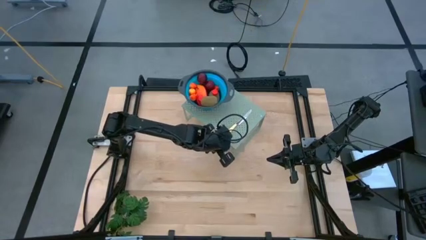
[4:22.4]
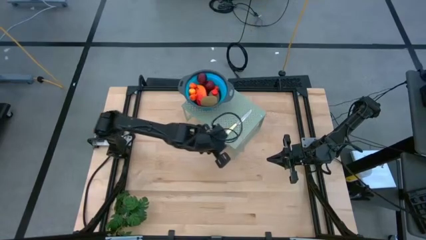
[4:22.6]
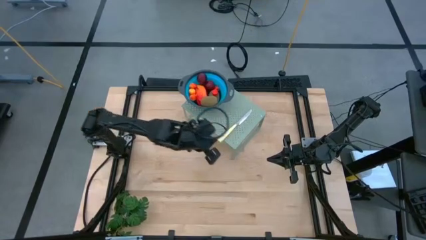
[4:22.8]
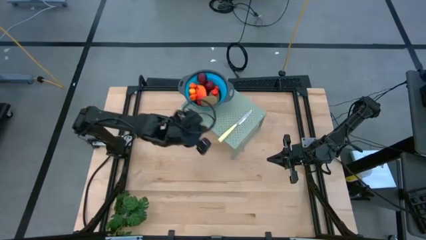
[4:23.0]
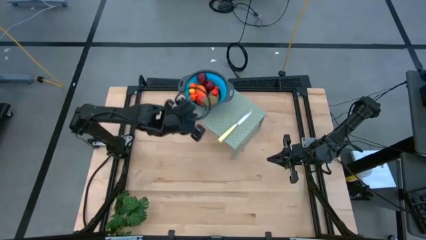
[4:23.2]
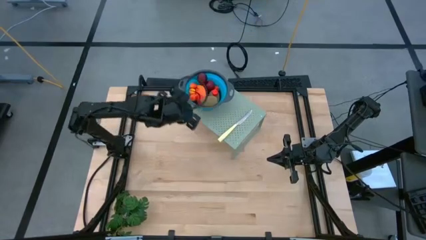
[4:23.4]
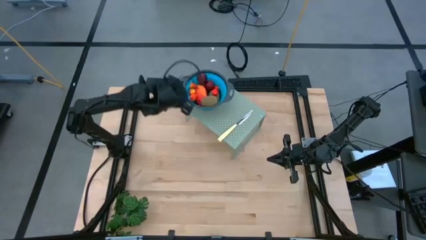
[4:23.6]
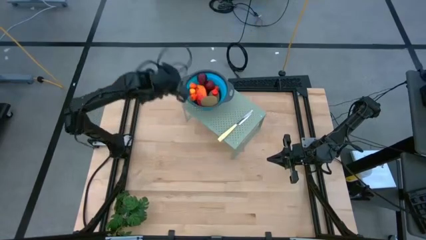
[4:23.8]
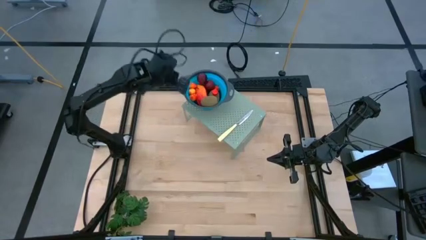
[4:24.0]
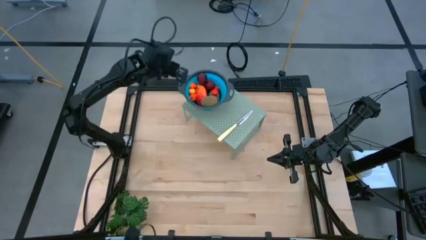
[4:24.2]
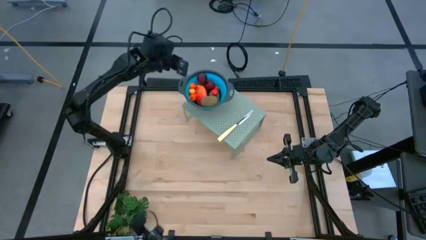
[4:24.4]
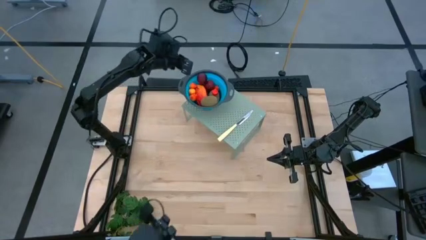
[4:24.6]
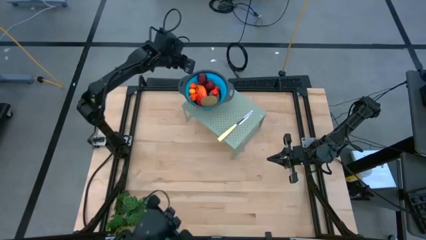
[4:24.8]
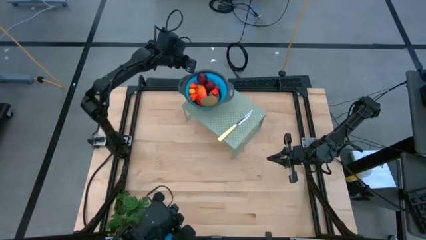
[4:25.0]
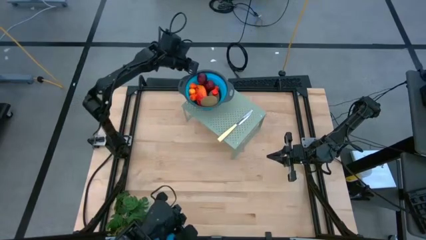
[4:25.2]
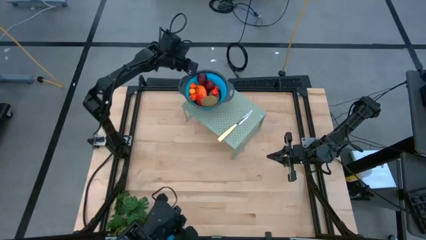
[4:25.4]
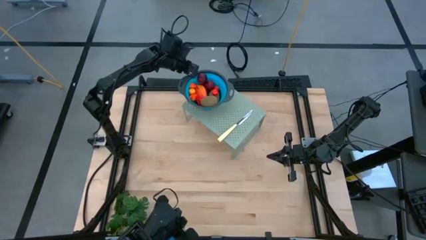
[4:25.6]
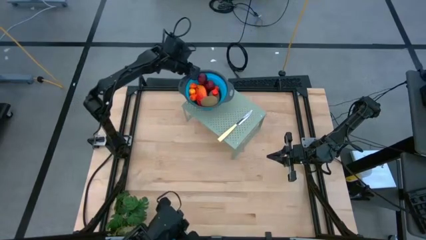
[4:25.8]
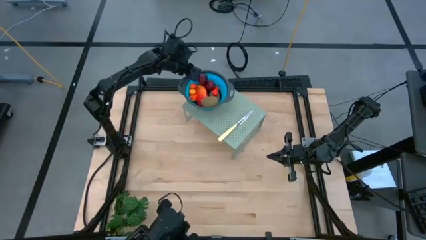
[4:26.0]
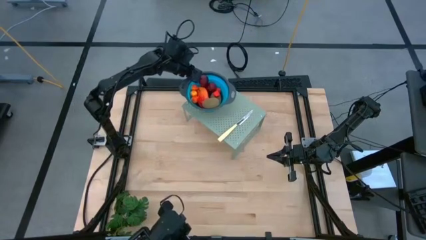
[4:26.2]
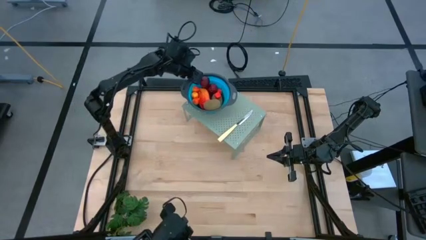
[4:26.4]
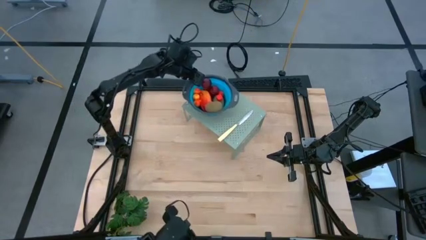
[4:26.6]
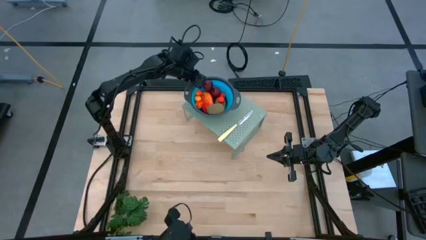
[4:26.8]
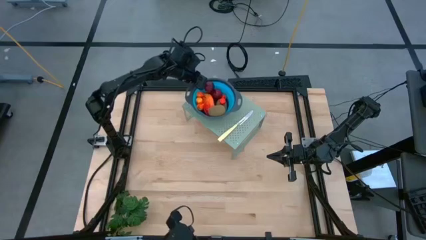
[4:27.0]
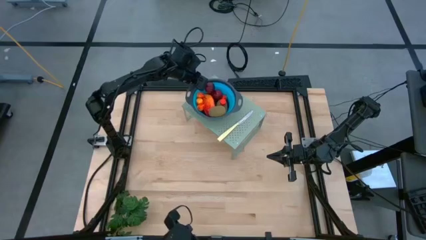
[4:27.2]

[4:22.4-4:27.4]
Task: Pick & Place Fruit
Adjust the blue strainer bowl on the shelf

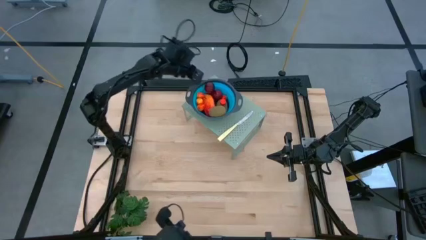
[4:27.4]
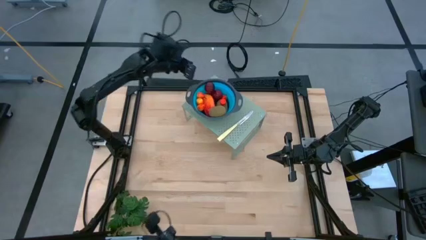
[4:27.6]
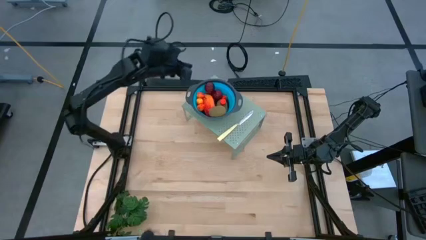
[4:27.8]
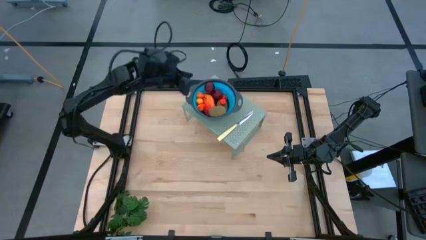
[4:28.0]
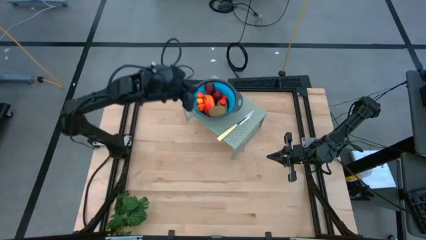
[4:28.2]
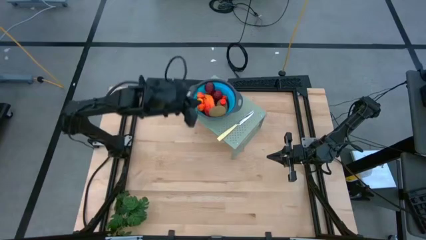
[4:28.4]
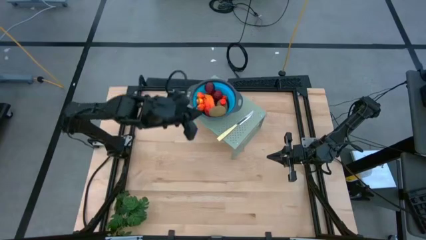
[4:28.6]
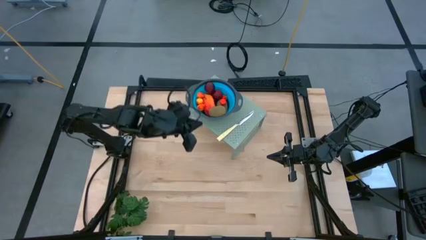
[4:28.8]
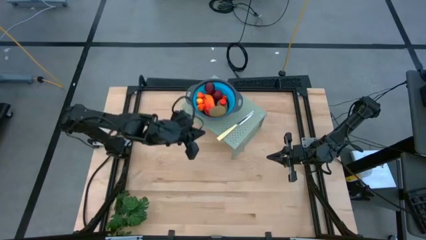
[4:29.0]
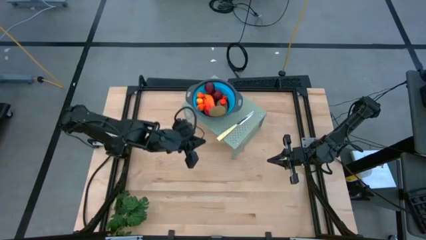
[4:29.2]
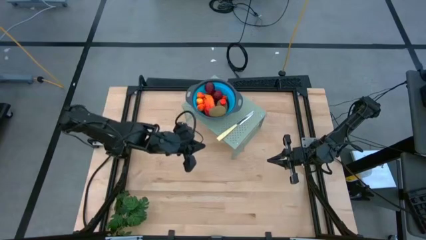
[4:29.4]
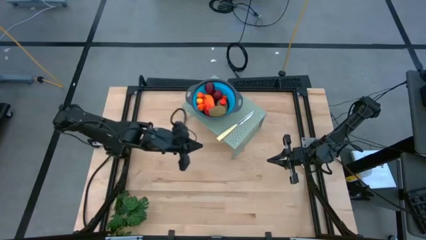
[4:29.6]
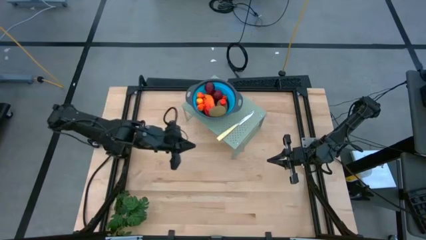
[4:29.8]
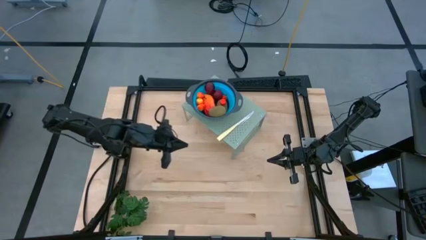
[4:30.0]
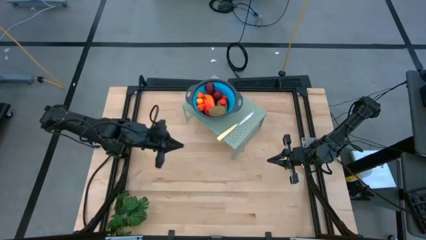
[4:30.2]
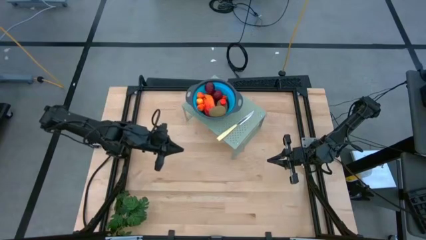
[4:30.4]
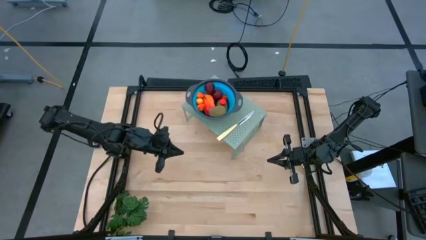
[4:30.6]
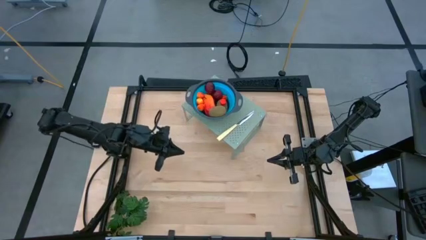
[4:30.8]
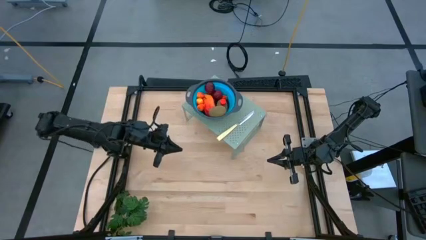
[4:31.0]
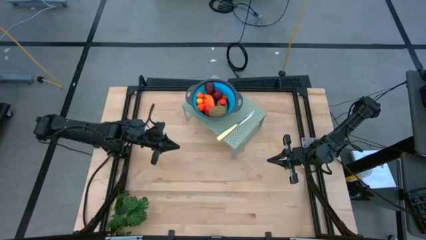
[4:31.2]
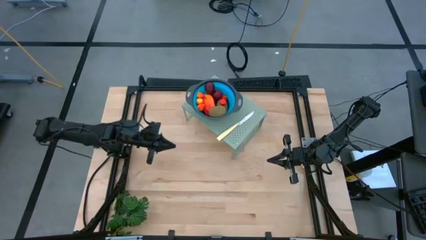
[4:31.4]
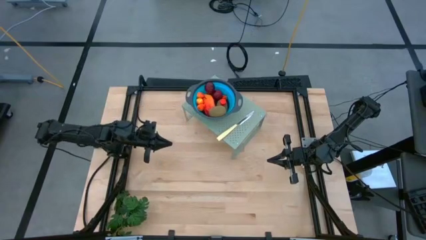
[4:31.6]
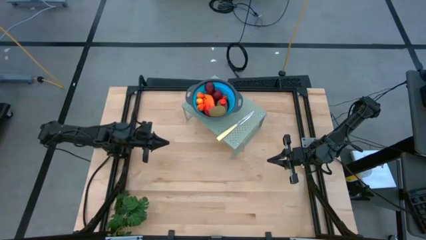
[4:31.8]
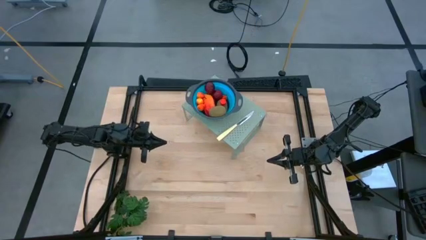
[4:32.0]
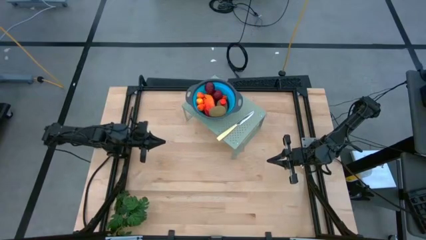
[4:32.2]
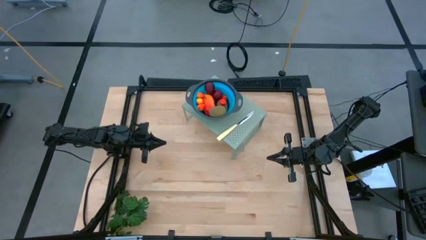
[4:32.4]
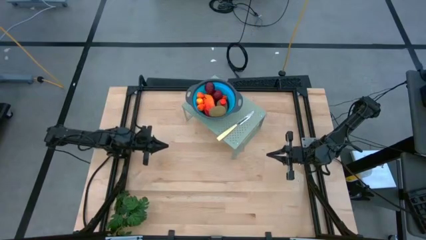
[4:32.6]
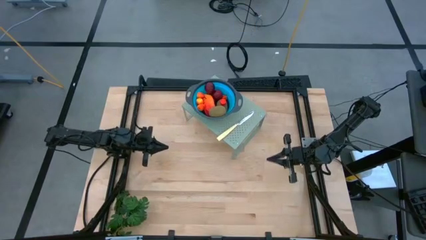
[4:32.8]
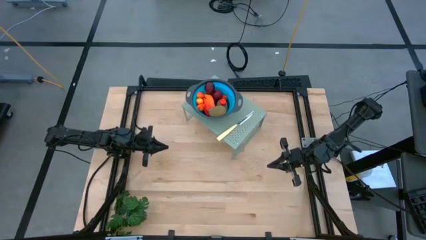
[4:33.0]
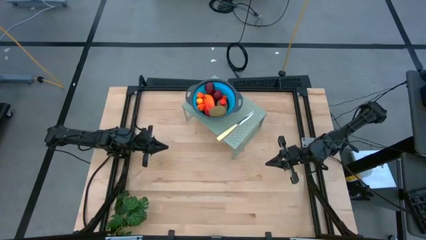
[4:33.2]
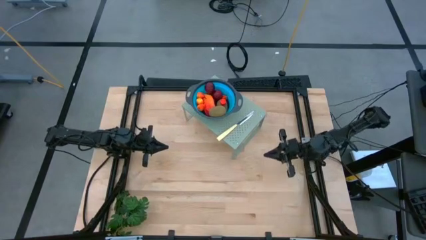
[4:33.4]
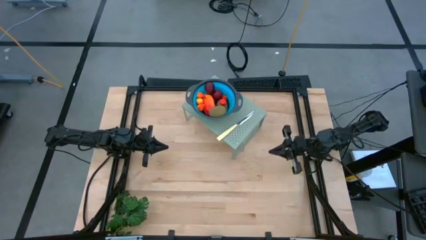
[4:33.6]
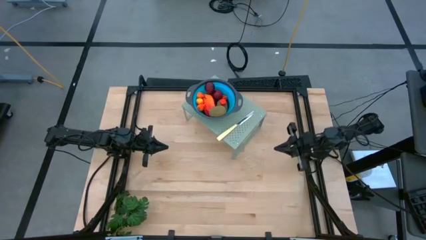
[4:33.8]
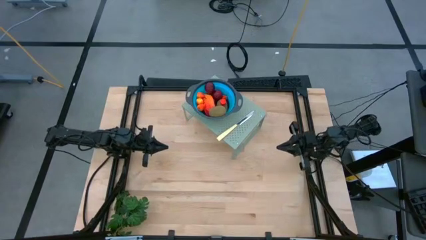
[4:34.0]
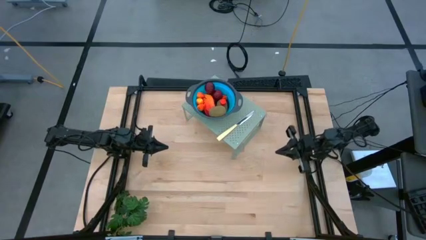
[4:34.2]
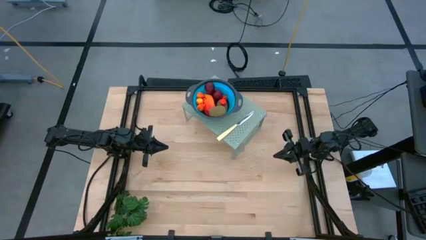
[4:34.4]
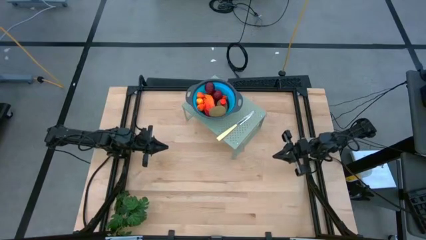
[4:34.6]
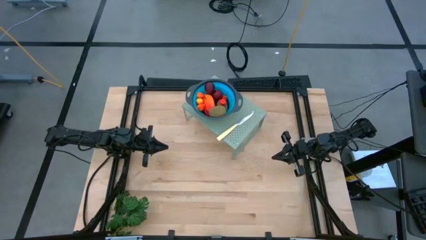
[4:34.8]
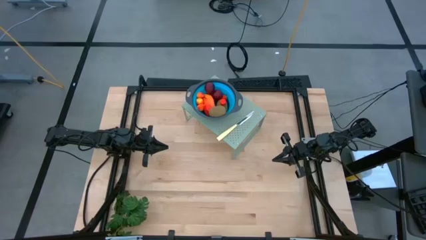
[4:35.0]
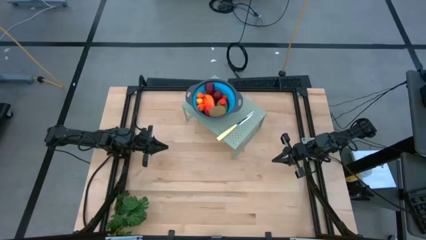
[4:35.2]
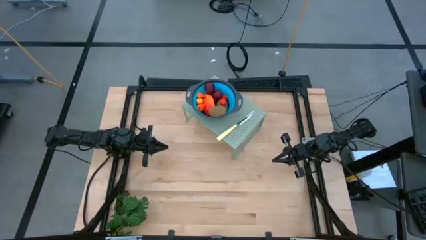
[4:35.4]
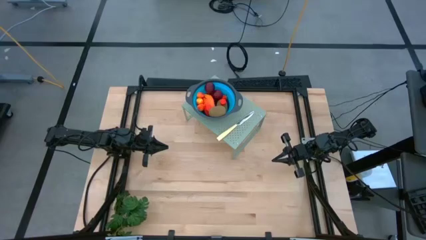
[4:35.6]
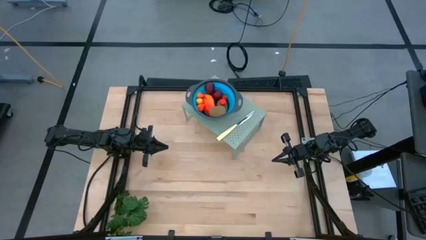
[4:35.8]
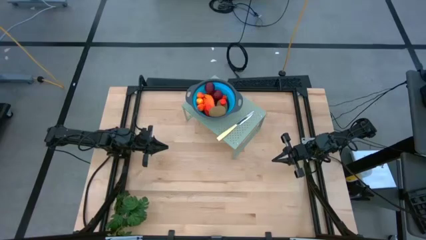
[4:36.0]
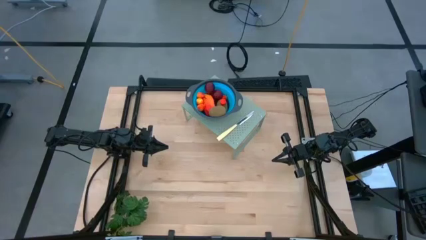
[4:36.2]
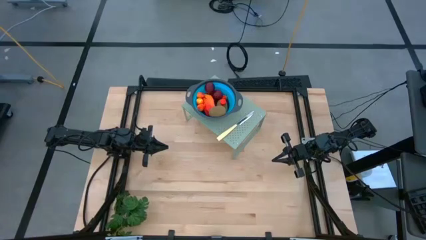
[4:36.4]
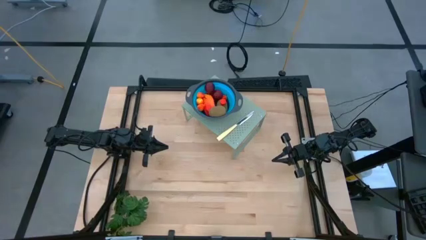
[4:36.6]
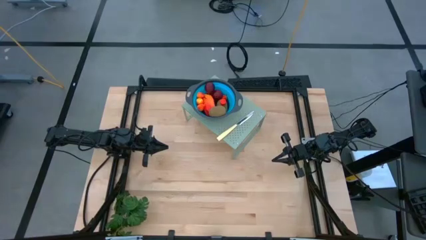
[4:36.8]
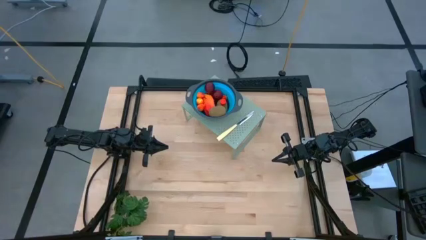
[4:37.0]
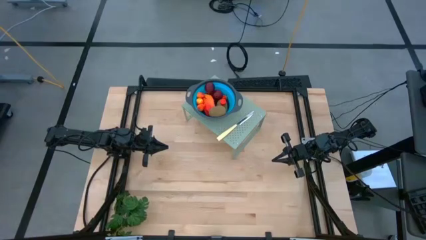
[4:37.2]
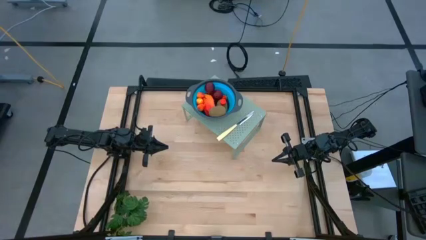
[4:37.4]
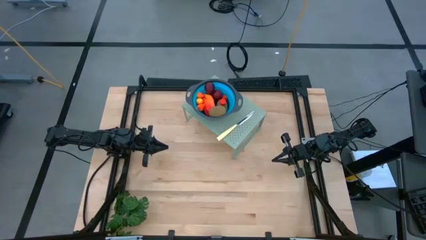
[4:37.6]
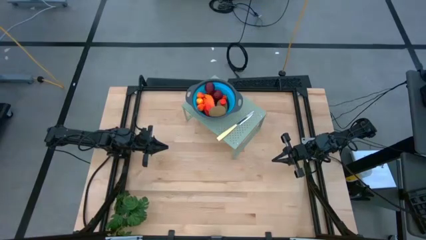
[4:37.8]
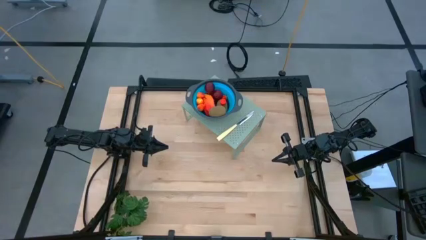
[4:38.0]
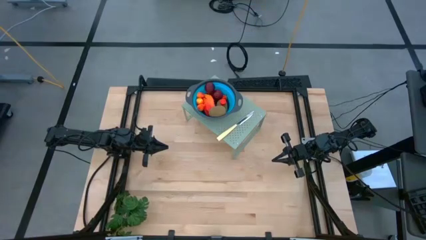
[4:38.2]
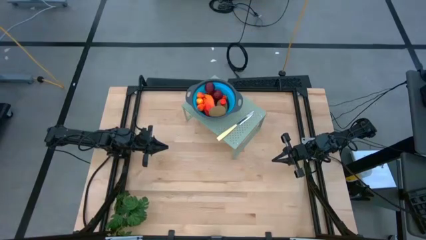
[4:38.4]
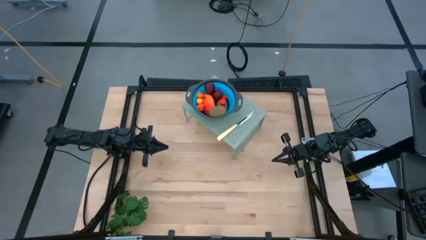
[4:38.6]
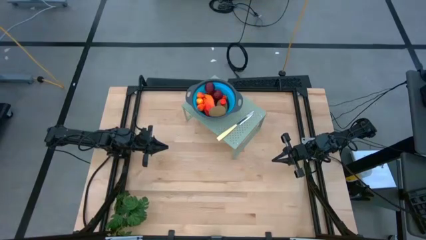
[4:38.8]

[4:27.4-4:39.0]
Return to Home Position
